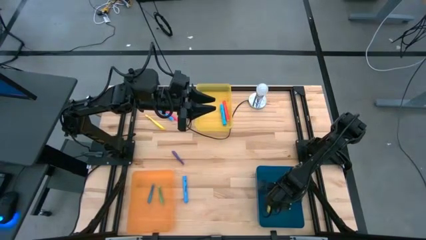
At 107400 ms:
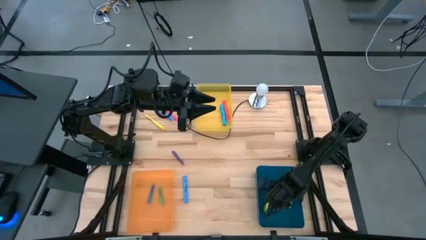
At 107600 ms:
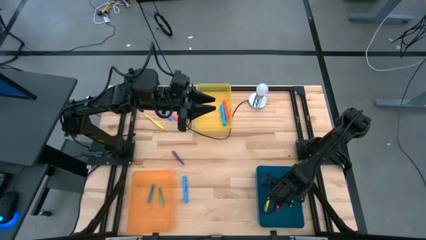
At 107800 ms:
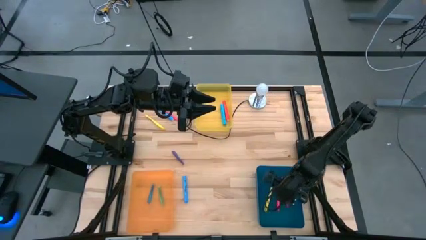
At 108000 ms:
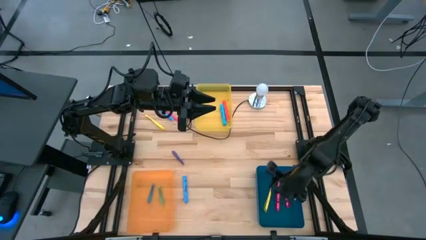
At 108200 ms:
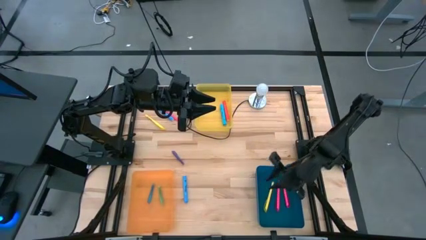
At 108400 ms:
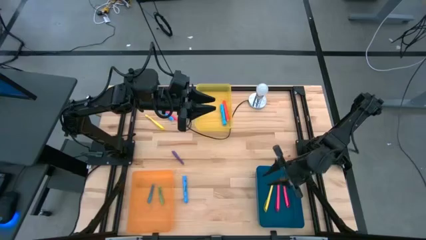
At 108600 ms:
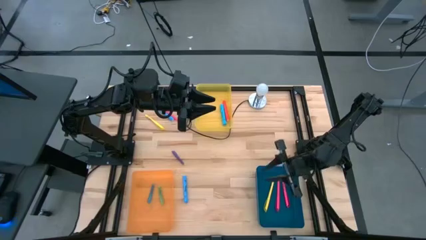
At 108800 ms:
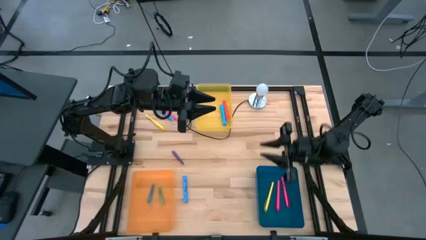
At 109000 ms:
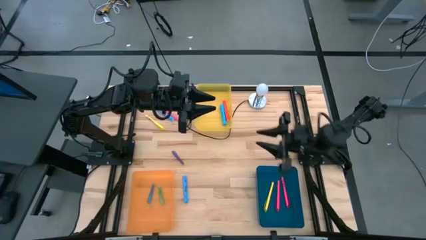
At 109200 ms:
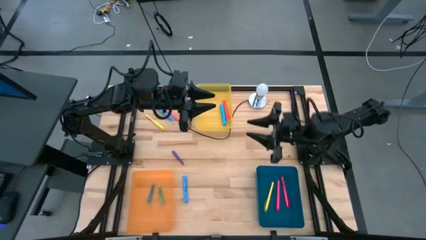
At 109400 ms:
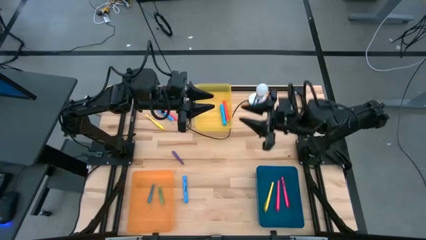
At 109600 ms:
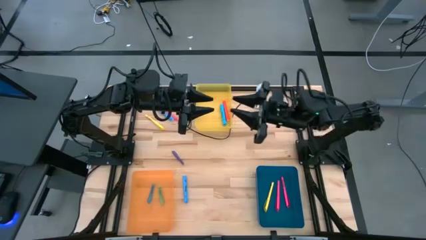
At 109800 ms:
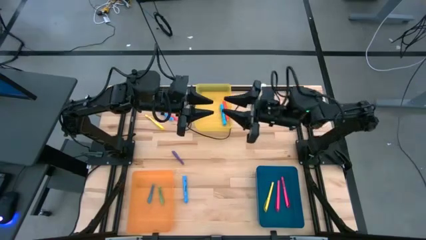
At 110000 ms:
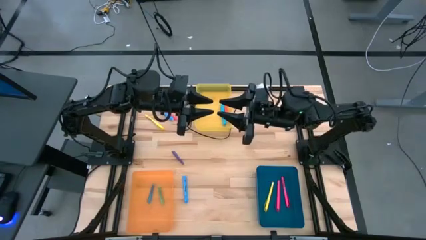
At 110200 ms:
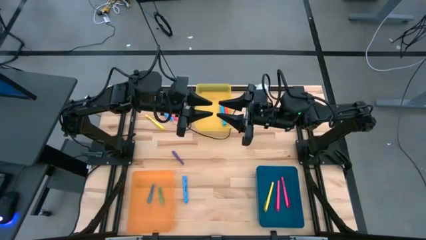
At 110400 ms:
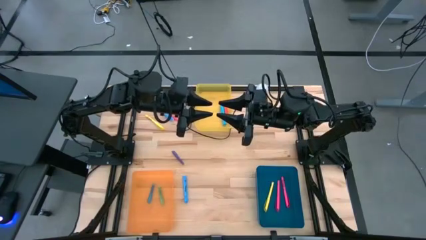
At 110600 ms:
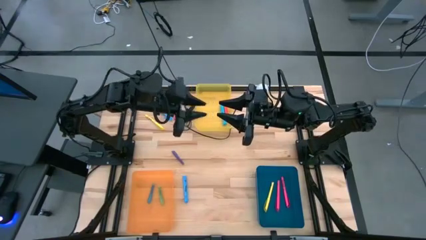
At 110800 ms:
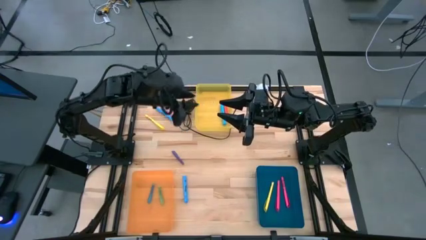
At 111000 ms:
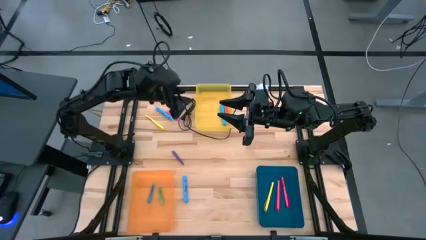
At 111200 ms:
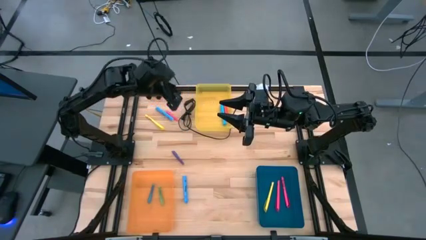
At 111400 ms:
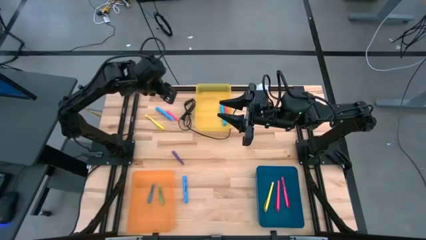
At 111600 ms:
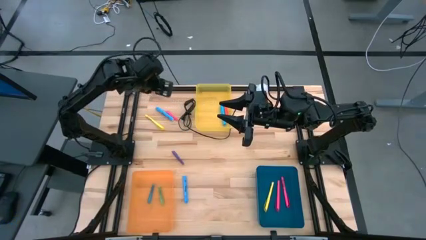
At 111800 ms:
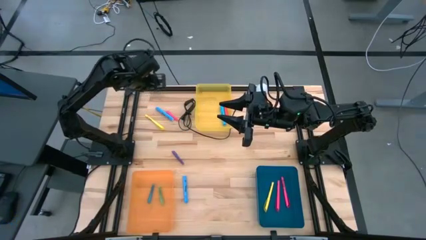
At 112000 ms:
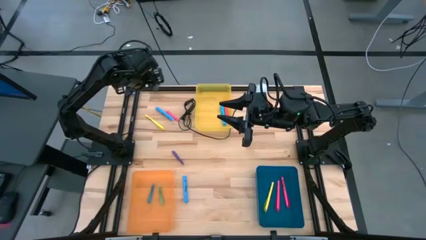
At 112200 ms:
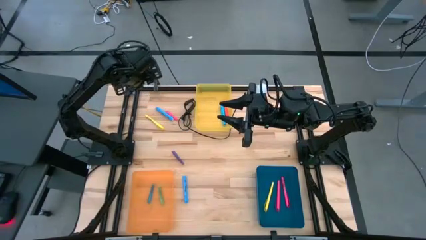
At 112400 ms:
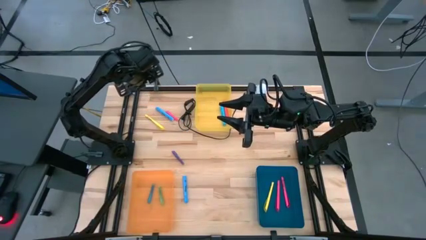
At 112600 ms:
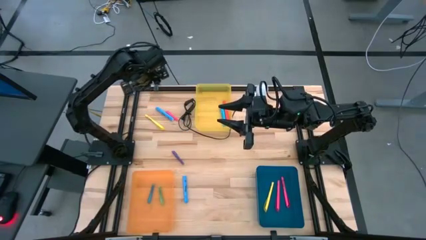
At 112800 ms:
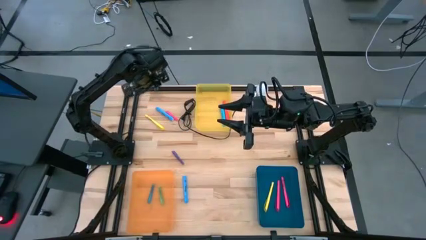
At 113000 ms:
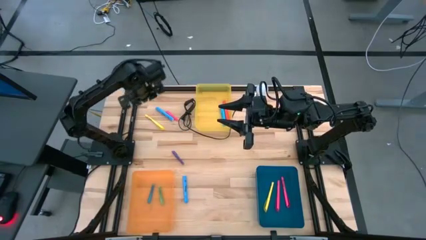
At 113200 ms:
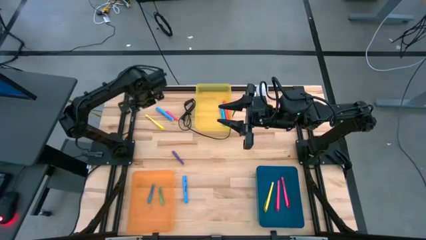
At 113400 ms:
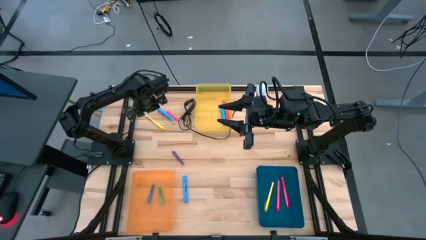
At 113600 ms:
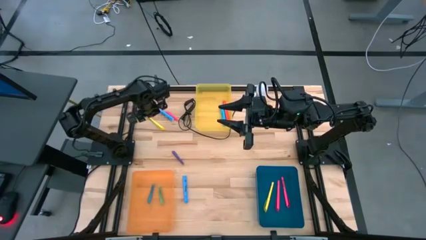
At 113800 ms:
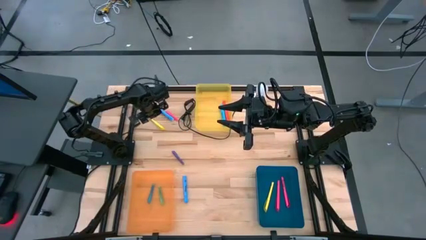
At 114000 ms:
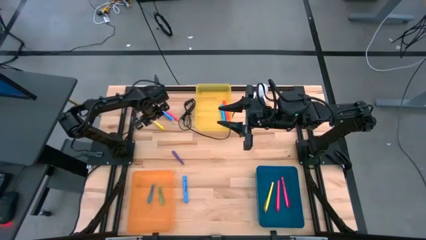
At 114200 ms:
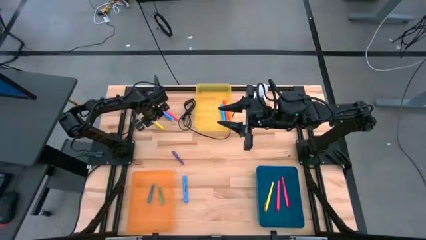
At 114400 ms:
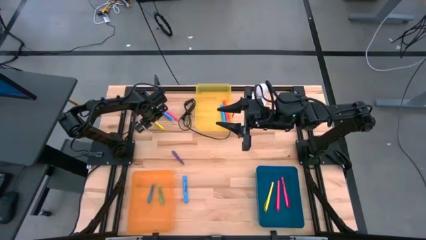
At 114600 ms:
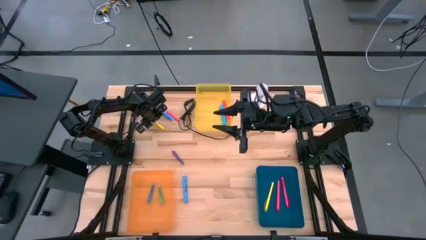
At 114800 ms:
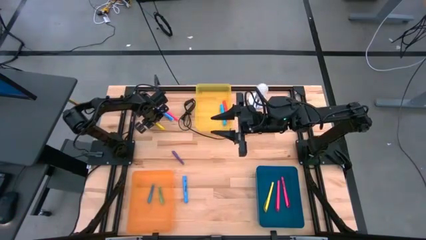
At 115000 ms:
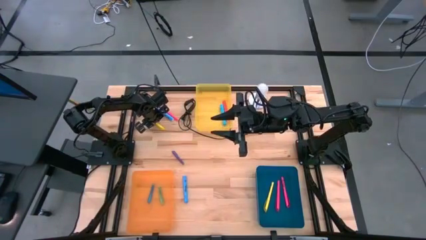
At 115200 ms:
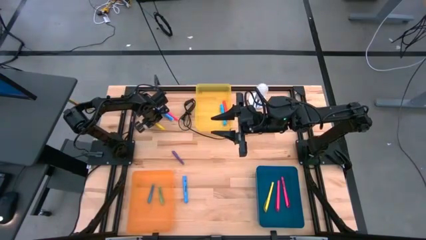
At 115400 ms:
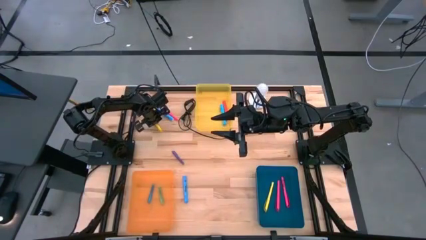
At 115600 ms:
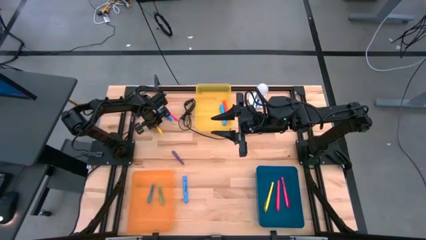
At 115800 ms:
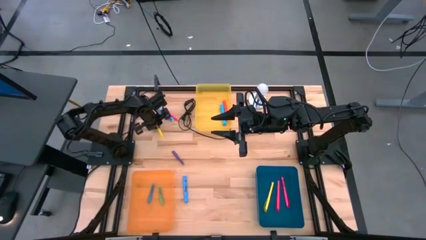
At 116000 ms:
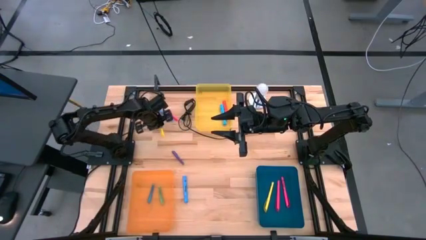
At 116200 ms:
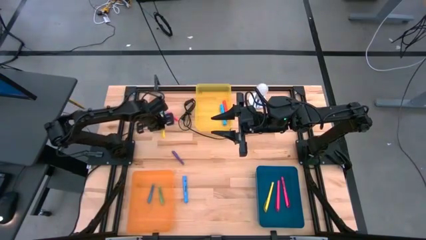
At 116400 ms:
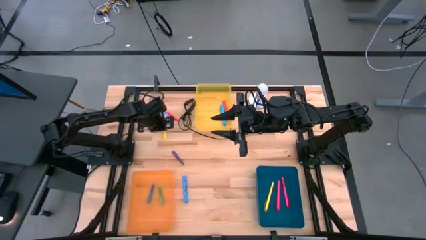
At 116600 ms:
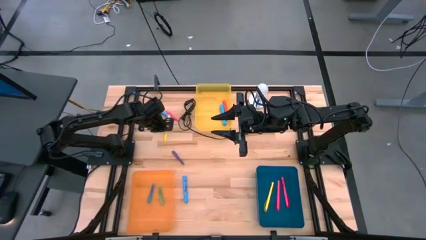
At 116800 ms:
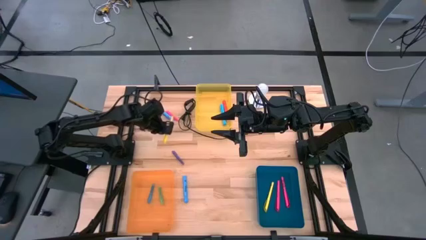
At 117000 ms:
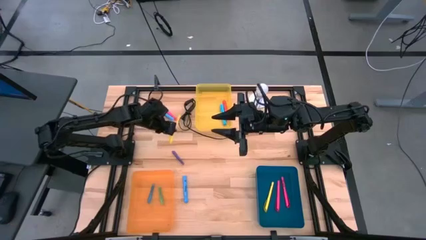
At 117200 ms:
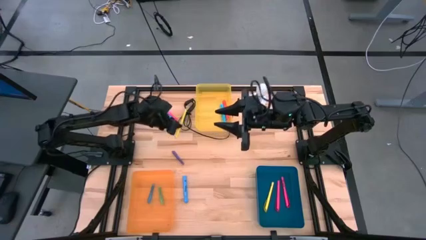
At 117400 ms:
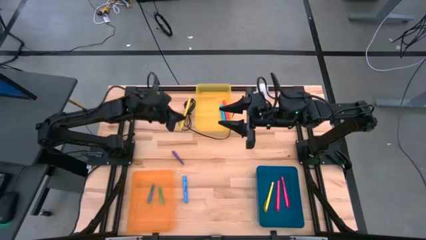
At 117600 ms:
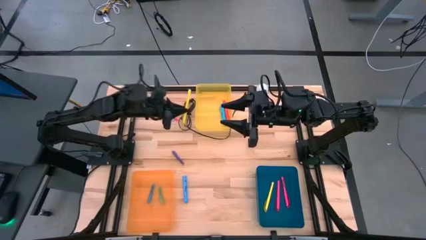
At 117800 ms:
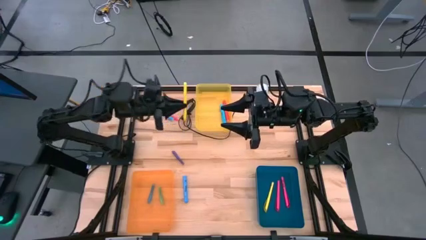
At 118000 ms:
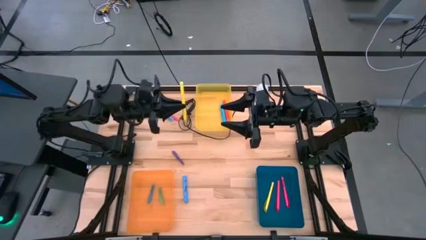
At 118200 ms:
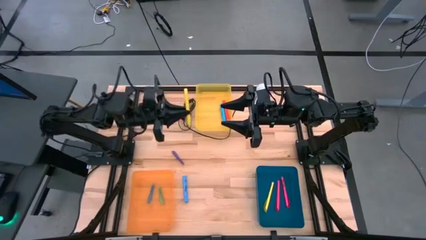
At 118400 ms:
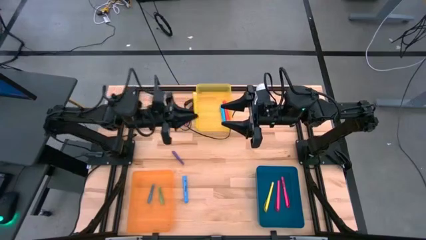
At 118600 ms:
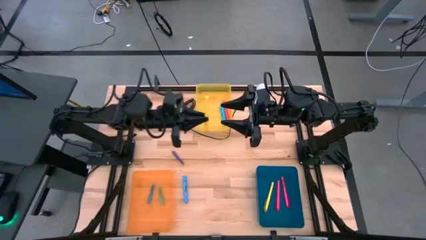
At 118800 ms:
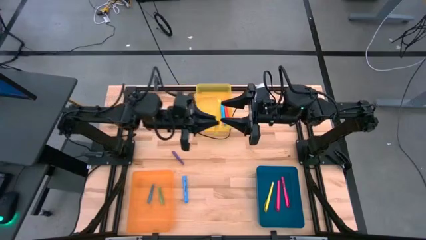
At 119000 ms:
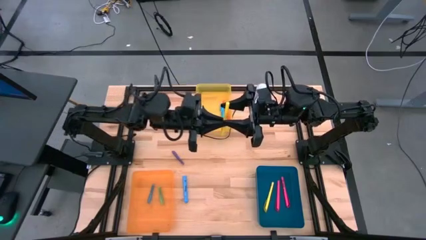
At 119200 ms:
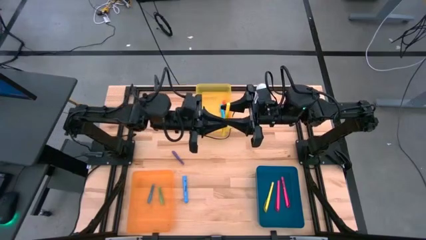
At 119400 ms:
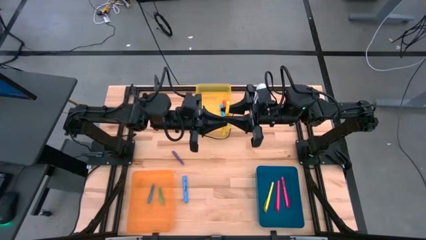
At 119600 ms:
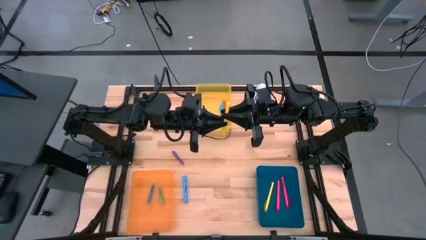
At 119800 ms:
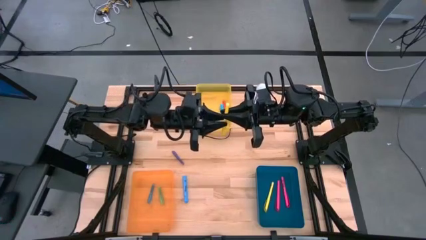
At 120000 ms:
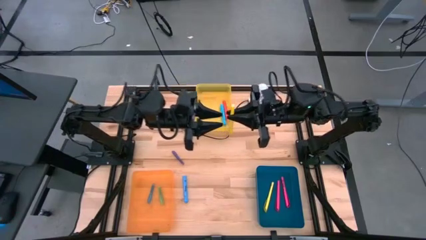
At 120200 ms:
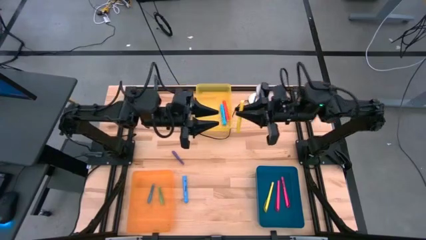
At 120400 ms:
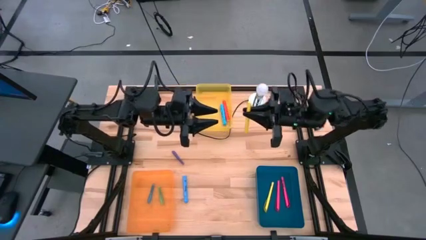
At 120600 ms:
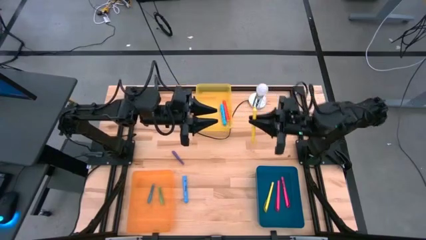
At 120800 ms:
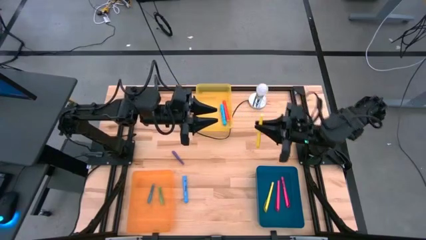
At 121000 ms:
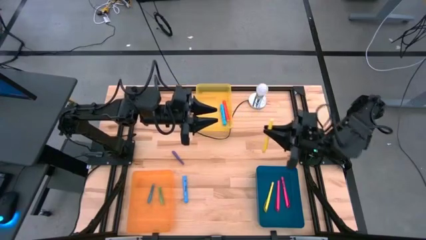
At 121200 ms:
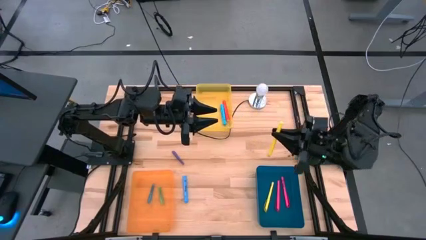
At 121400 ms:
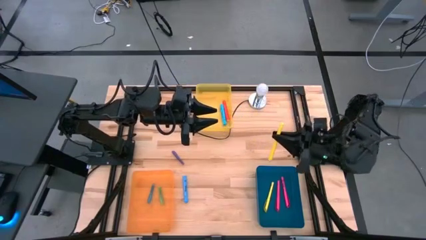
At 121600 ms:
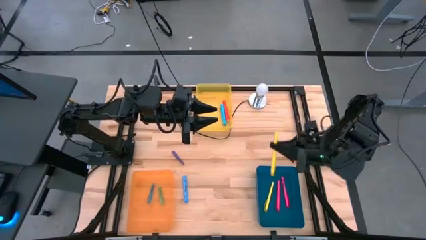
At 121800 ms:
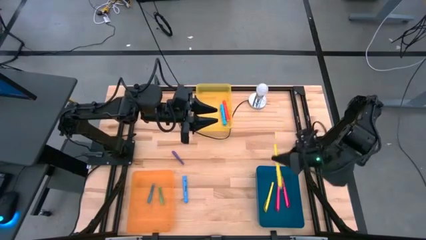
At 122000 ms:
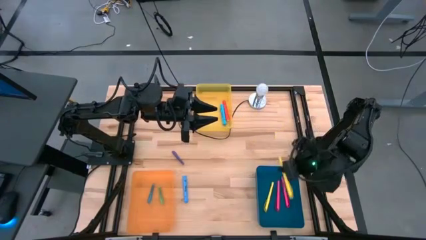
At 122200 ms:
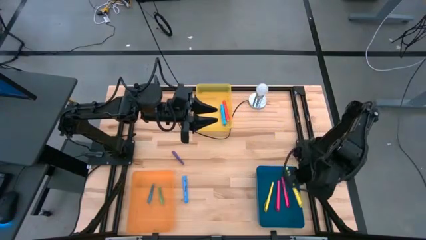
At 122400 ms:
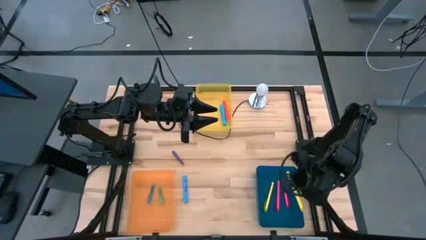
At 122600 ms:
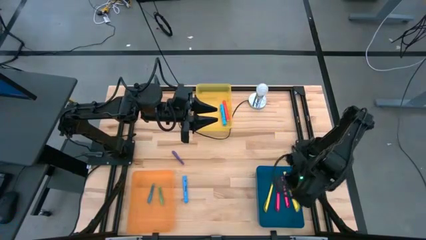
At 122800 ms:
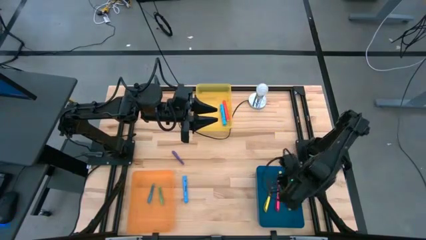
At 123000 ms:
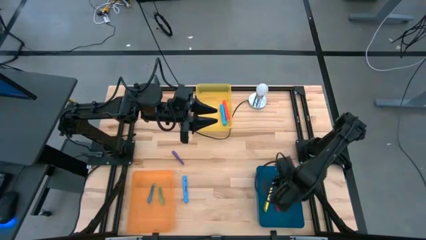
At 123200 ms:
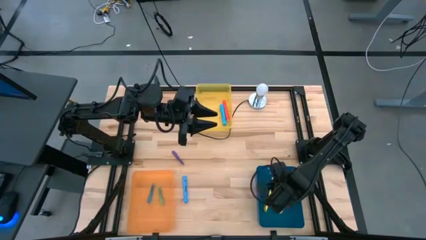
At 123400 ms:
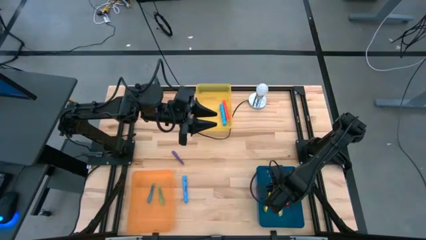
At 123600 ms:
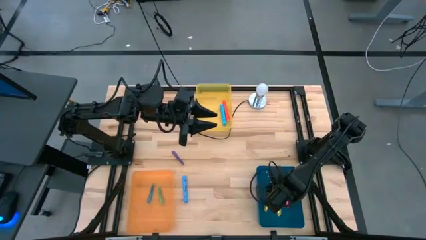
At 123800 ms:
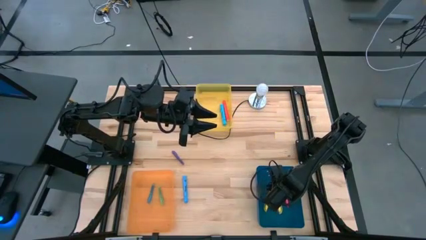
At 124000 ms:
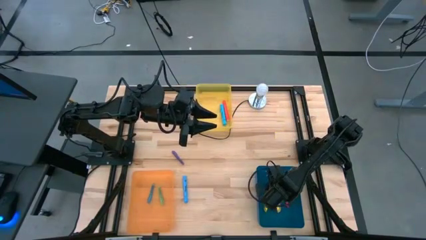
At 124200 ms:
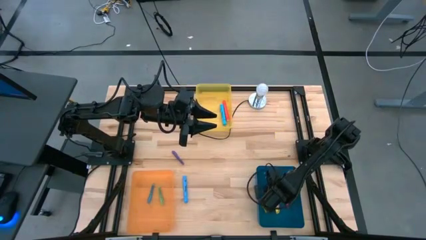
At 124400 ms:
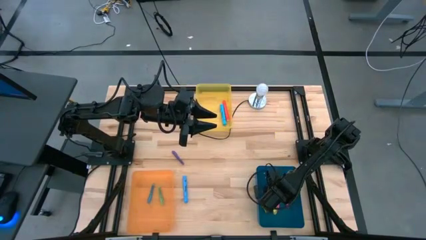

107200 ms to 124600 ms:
Task: Pick & Place Markers
Put the yellow highlighter pen into the blue bin
